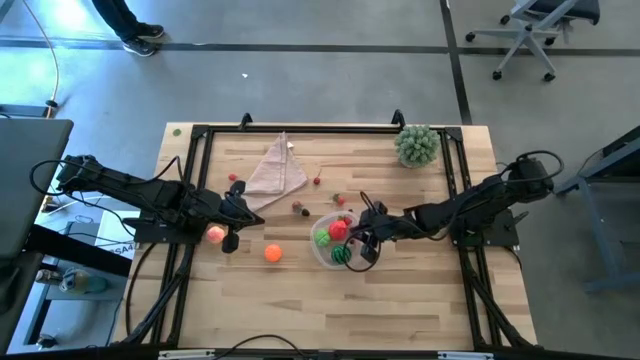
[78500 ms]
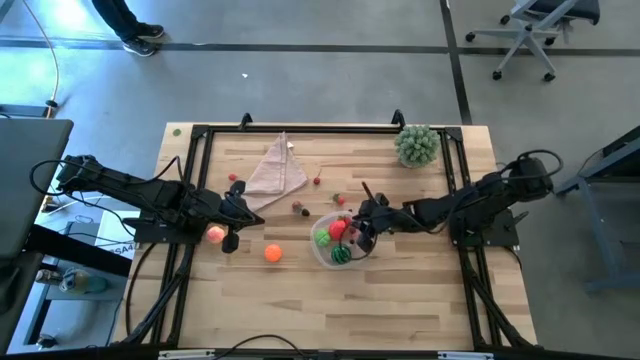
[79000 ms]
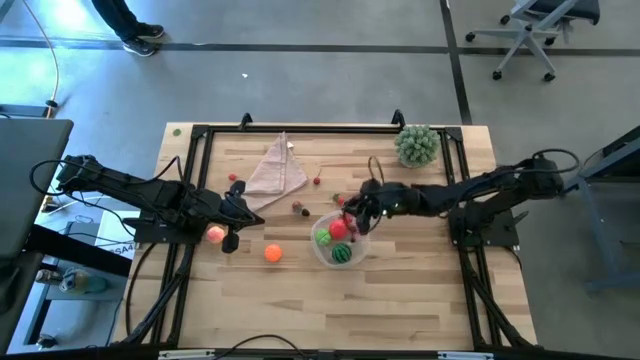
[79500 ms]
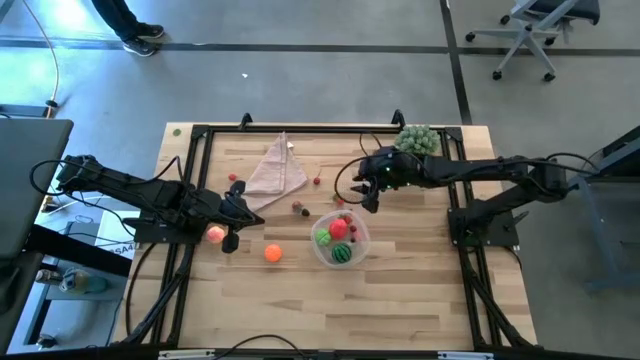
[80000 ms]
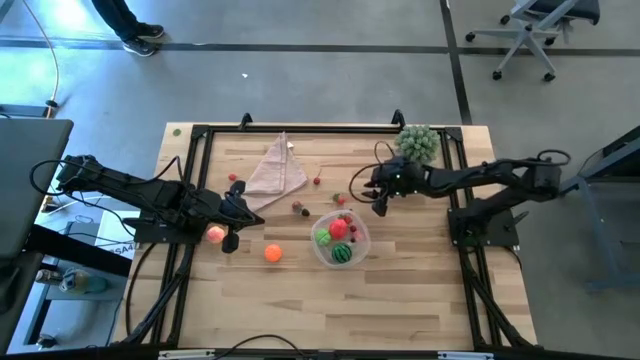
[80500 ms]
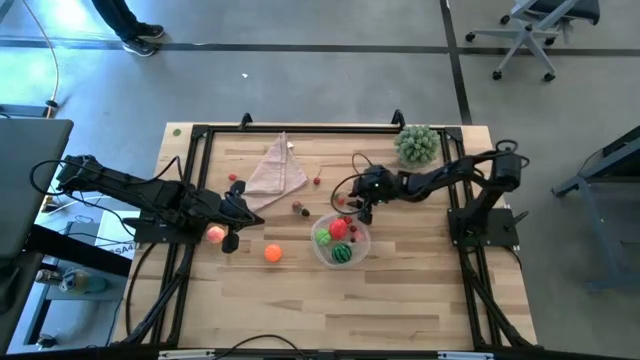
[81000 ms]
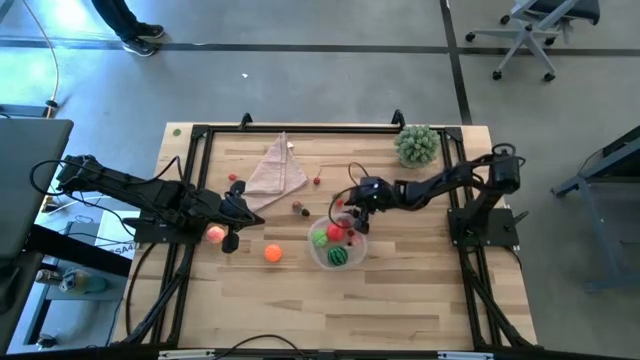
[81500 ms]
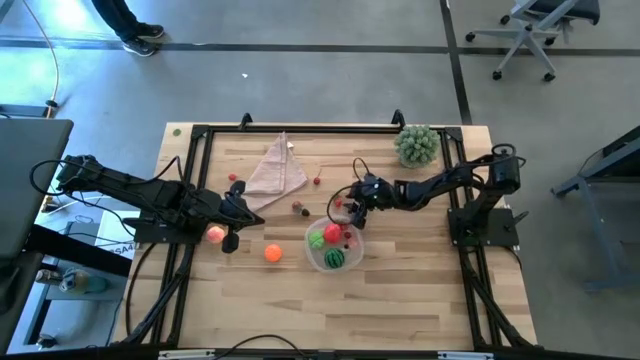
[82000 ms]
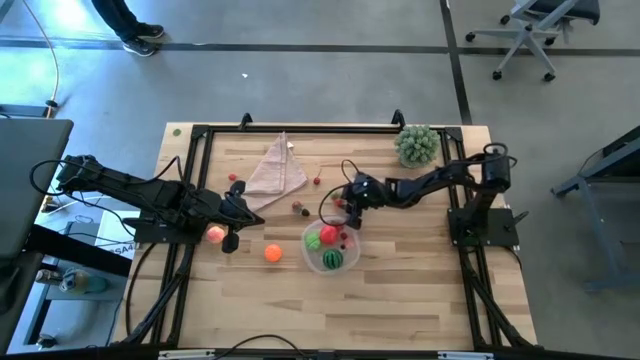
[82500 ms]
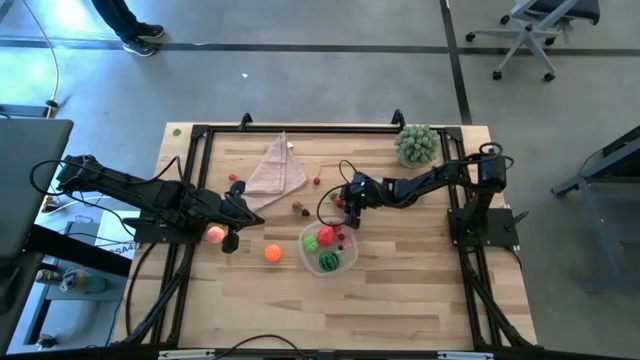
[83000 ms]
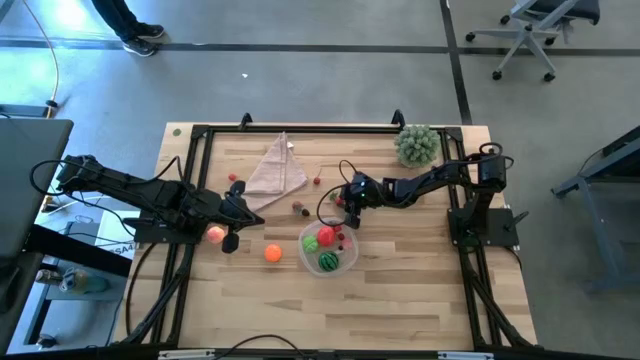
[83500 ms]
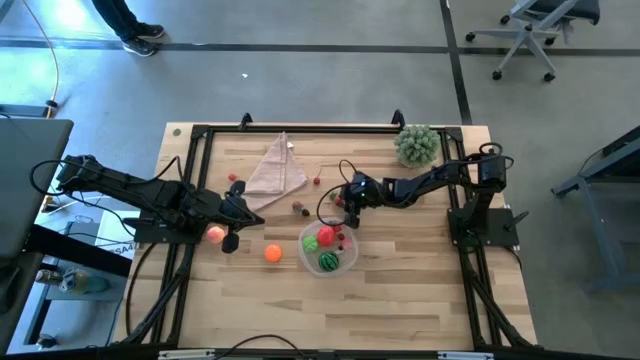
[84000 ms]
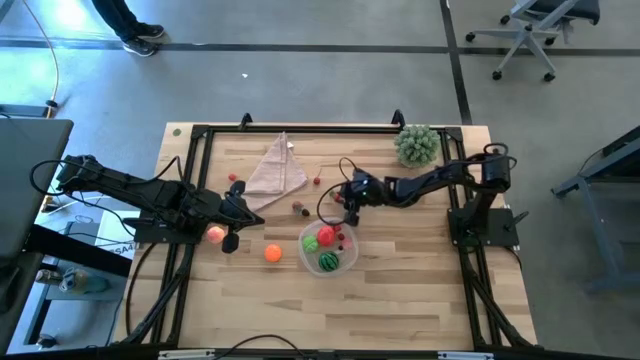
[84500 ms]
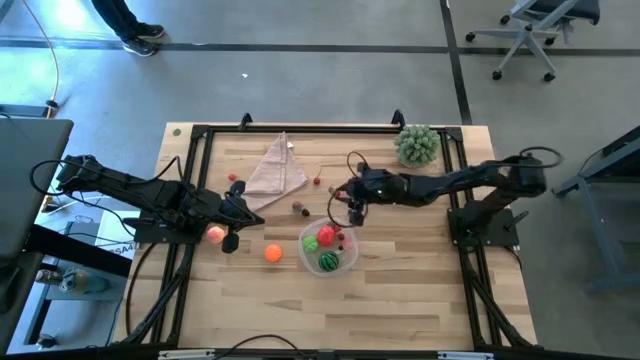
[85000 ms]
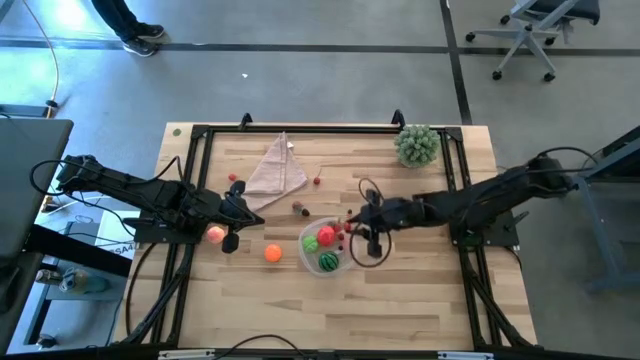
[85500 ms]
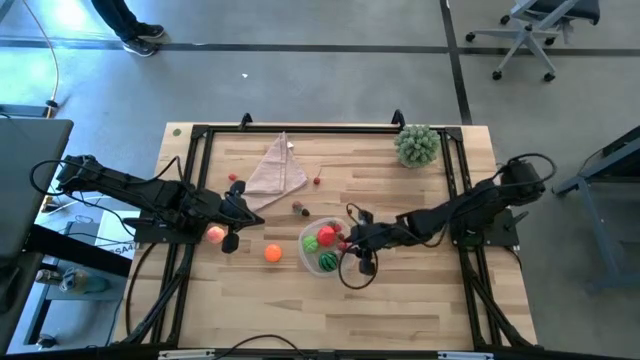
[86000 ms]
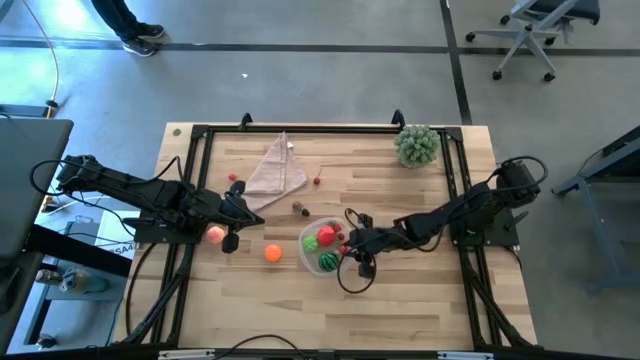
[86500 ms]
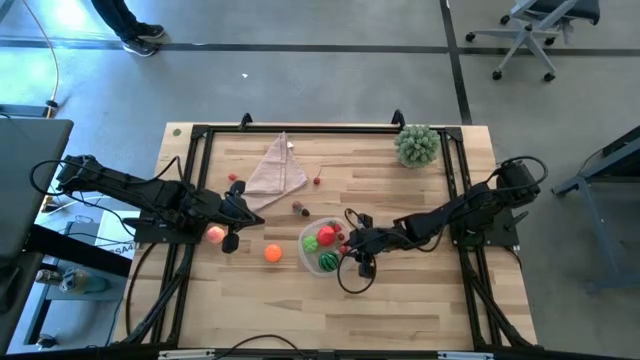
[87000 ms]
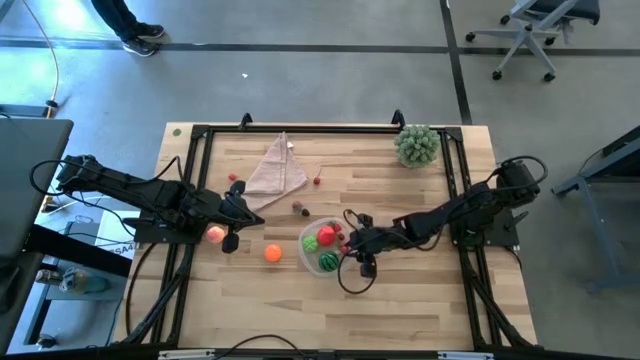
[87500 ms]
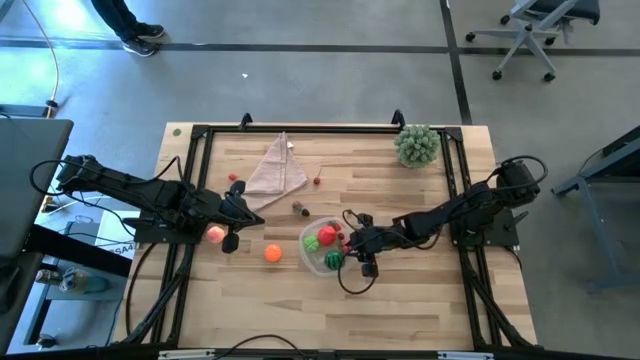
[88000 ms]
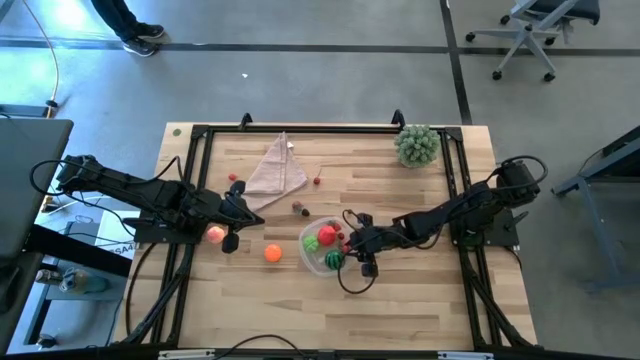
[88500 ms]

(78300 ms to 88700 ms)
Task: Pick and placing Produce into tupperware
Put the red tomato into the transparent bin

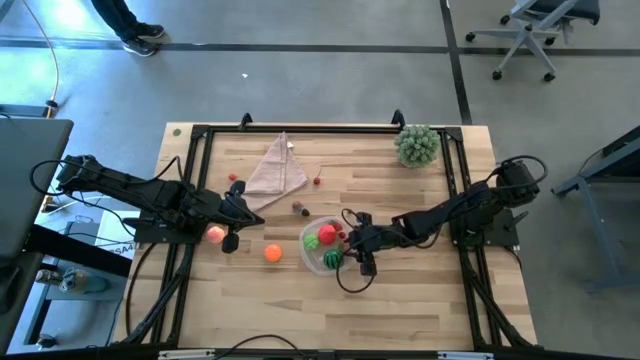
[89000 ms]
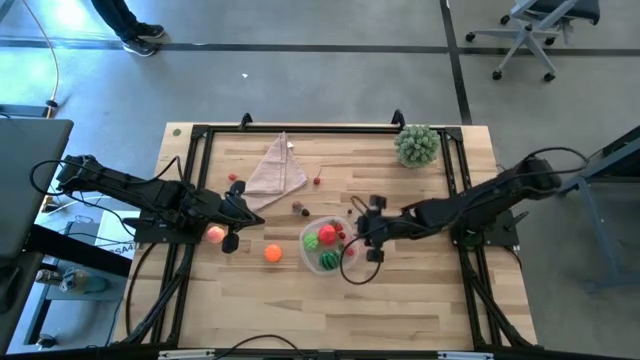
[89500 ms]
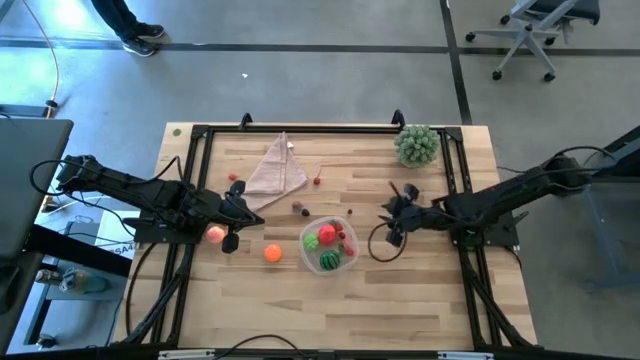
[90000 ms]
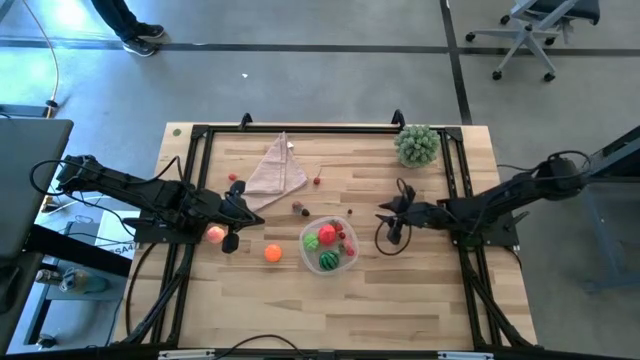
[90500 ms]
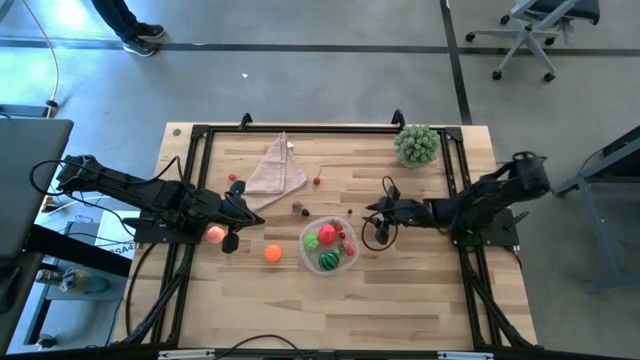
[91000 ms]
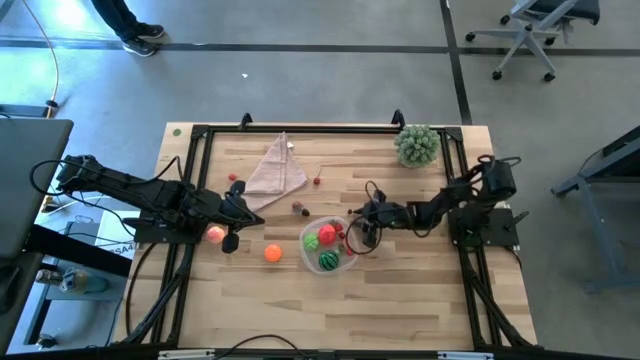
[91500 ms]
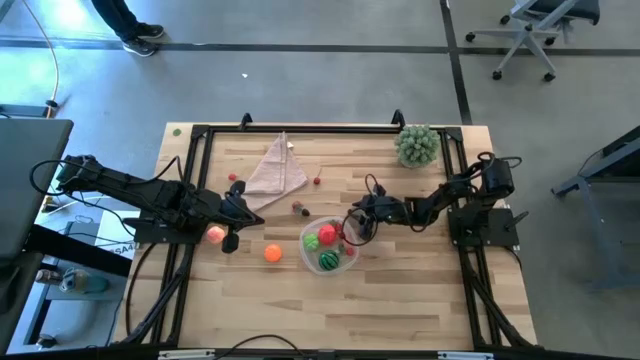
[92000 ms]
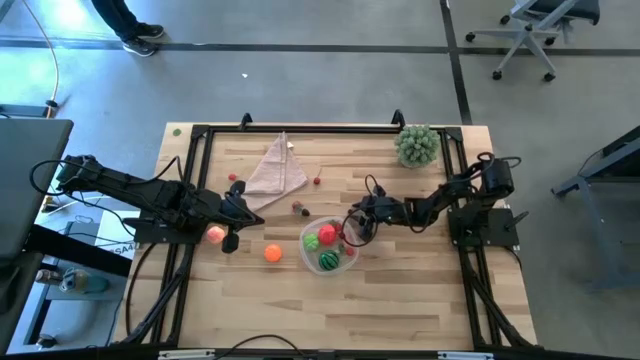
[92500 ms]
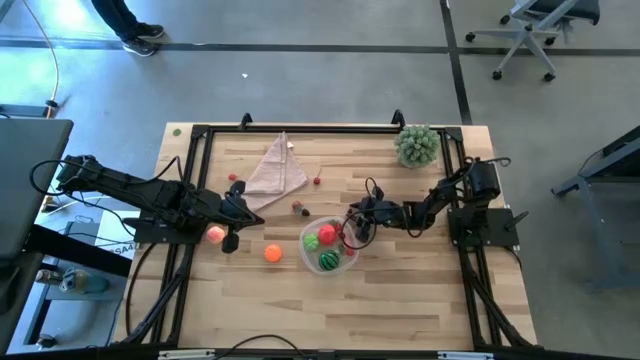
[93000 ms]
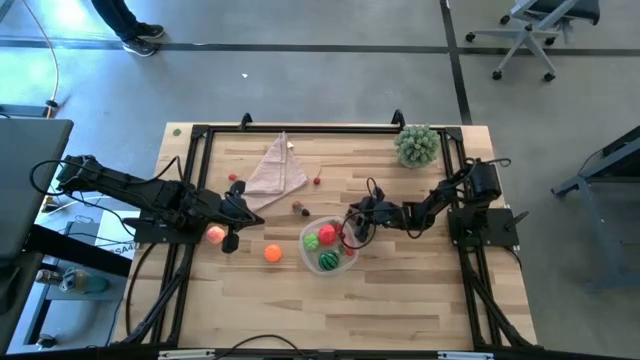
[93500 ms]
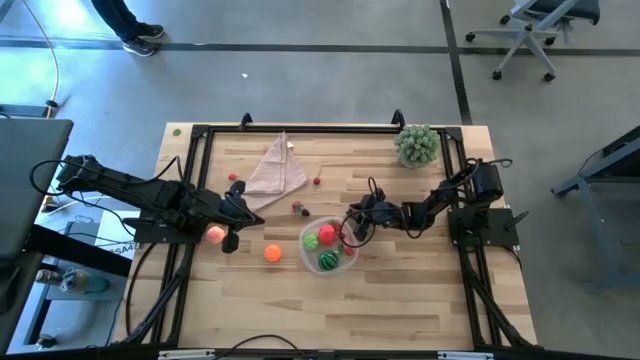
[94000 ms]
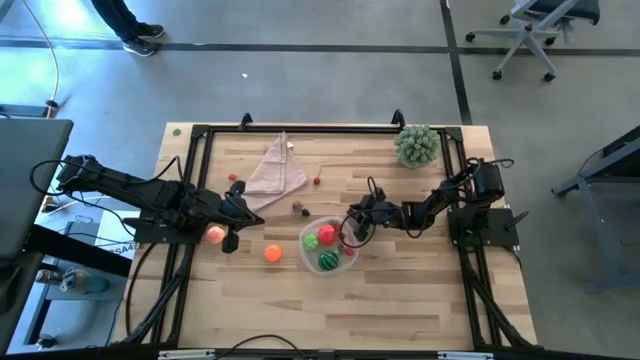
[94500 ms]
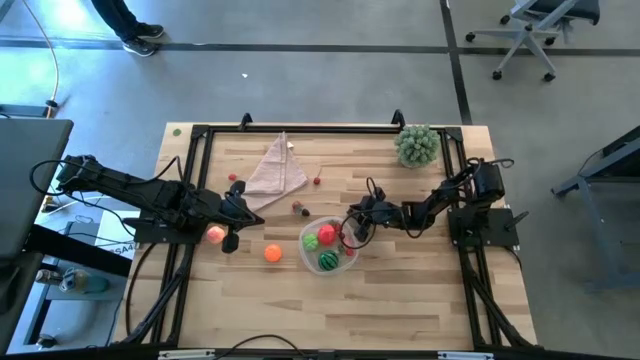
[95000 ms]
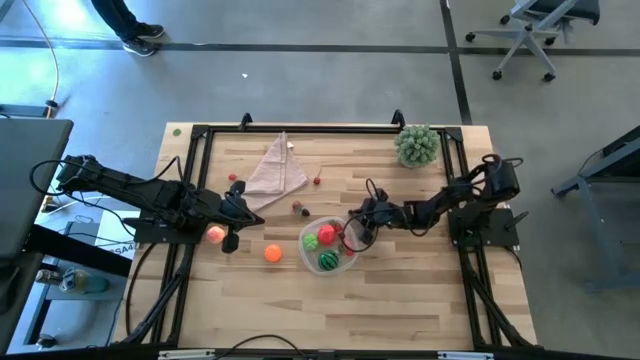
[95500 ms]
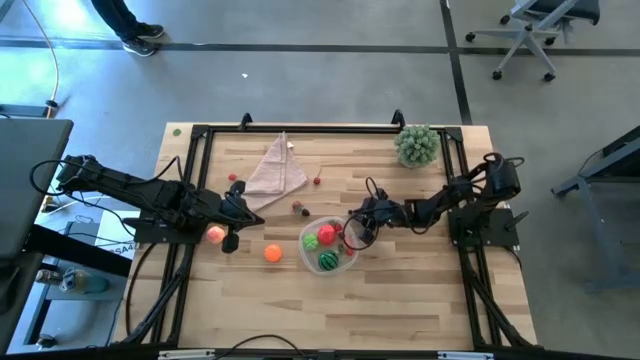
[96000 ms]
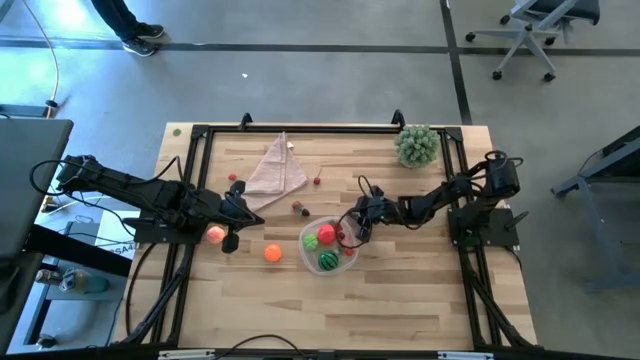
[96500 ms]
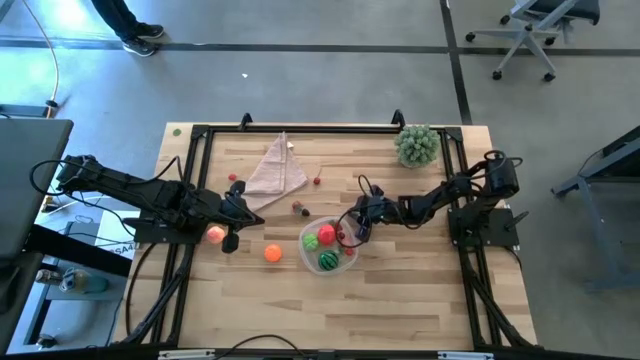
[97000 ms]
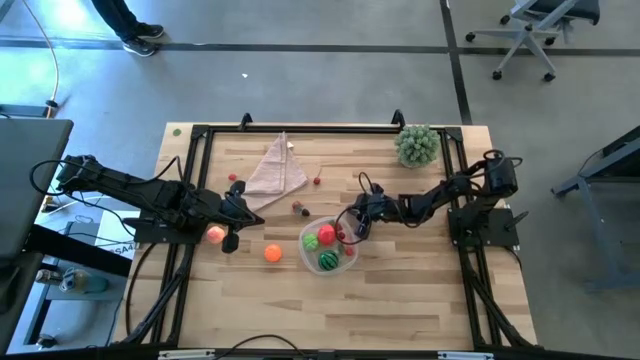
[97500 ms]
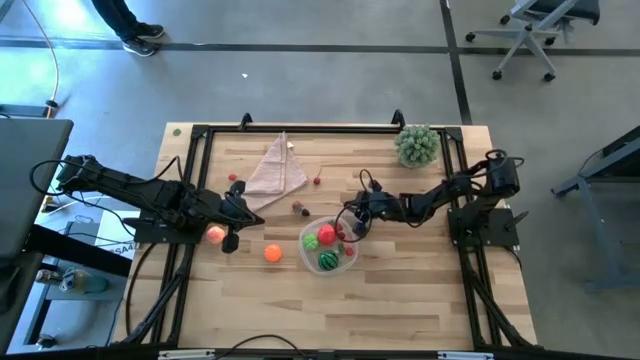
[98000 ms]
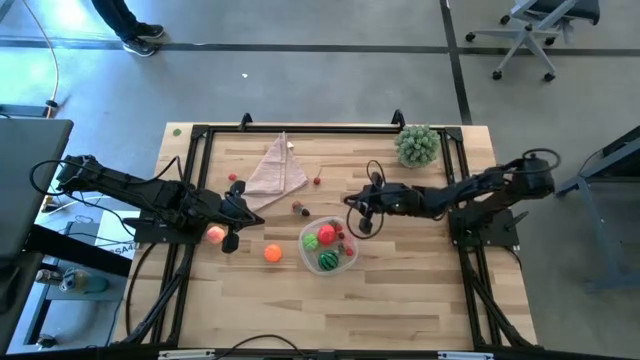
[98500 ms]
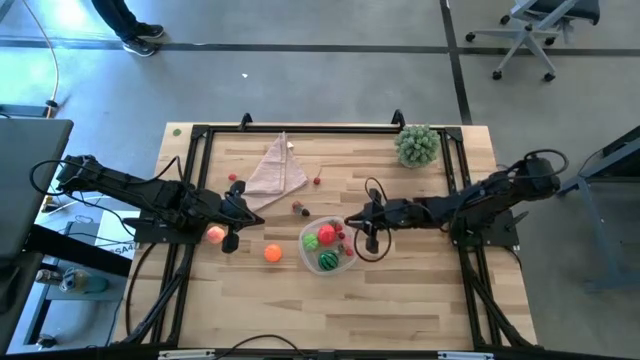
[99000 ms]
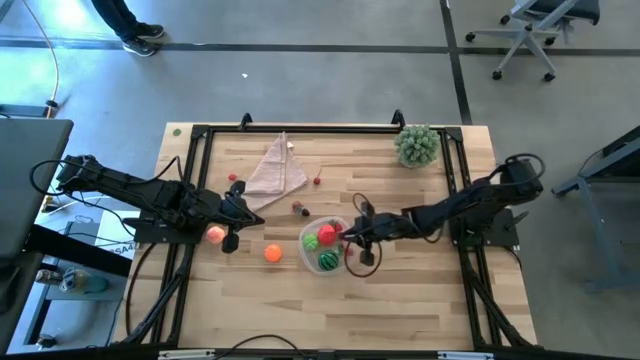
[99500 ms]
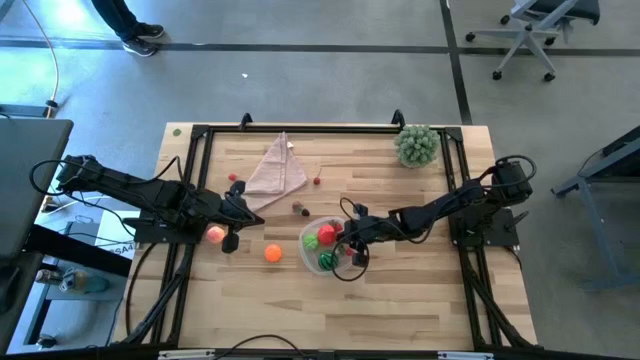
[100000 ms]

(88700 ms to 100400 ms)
Put the blueberry into the transparent bin
